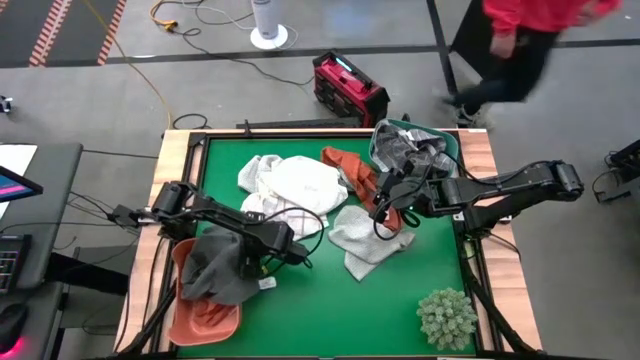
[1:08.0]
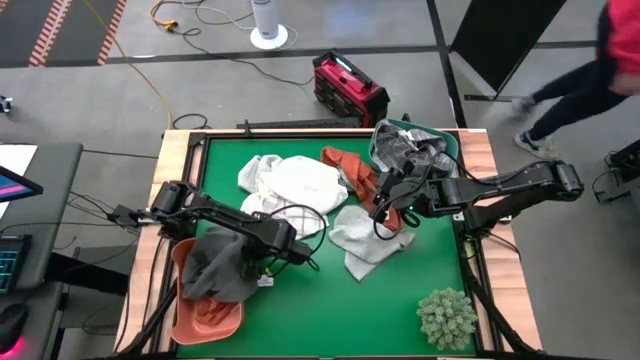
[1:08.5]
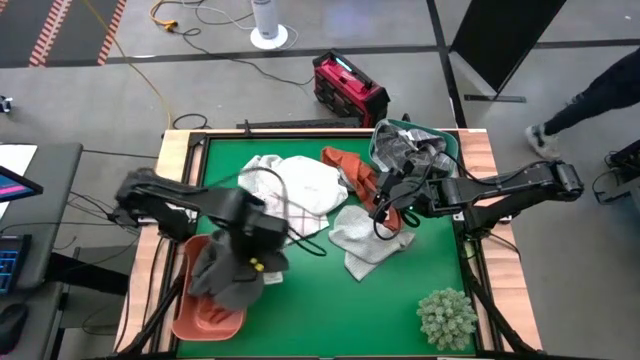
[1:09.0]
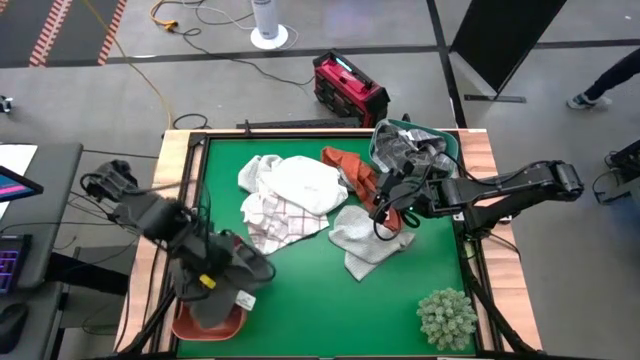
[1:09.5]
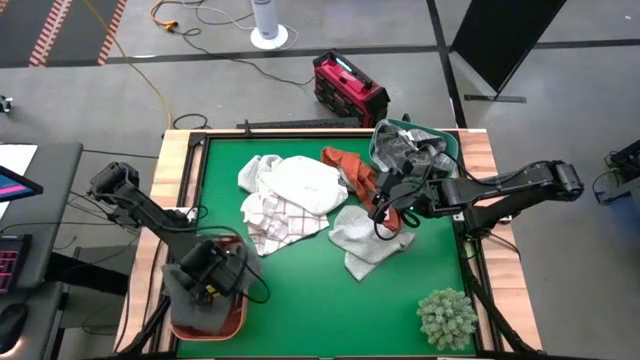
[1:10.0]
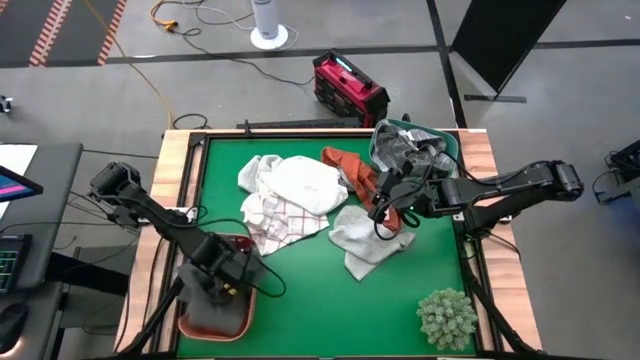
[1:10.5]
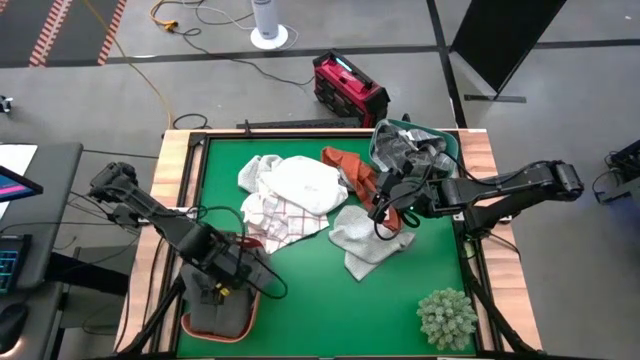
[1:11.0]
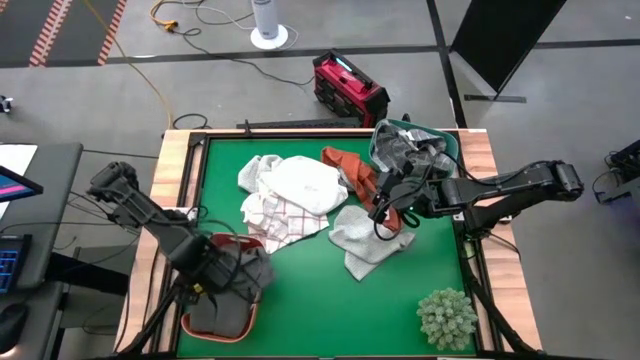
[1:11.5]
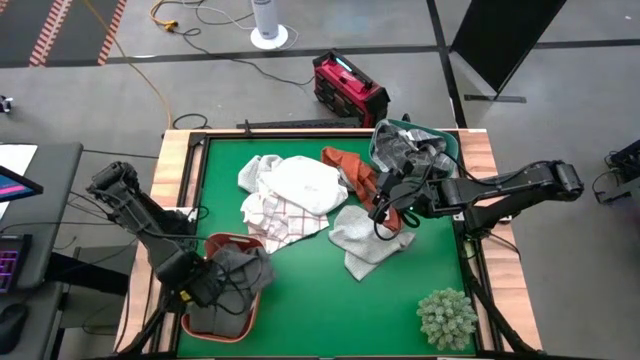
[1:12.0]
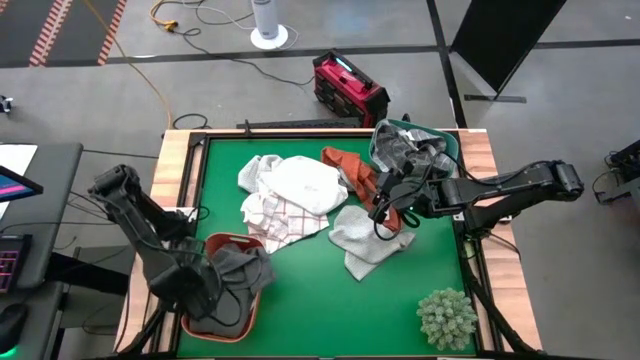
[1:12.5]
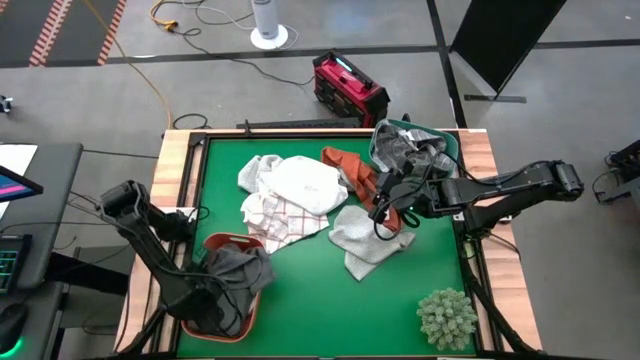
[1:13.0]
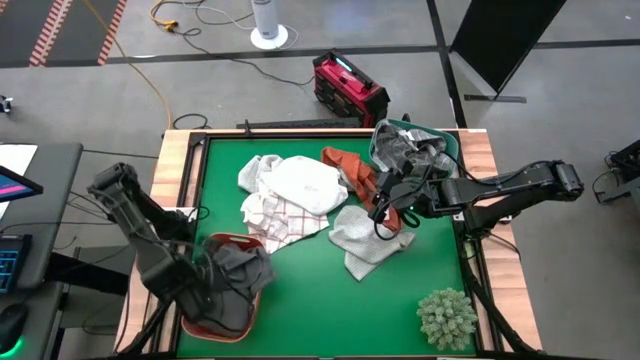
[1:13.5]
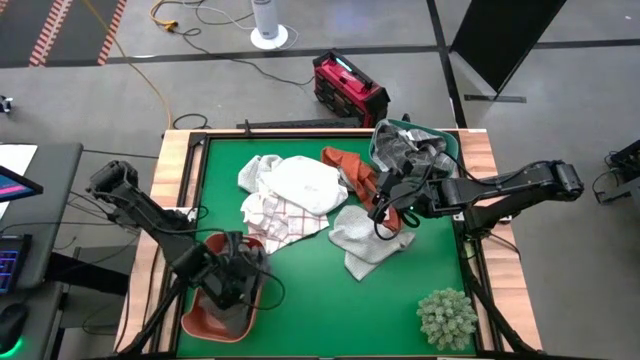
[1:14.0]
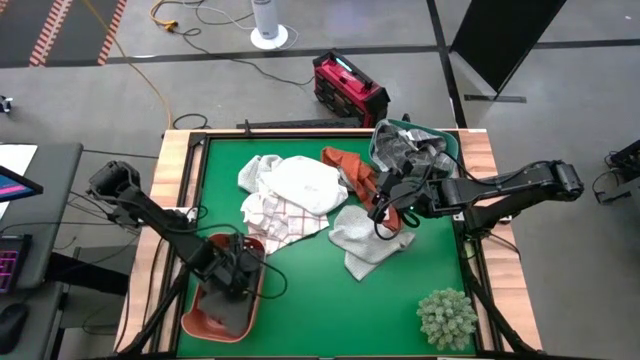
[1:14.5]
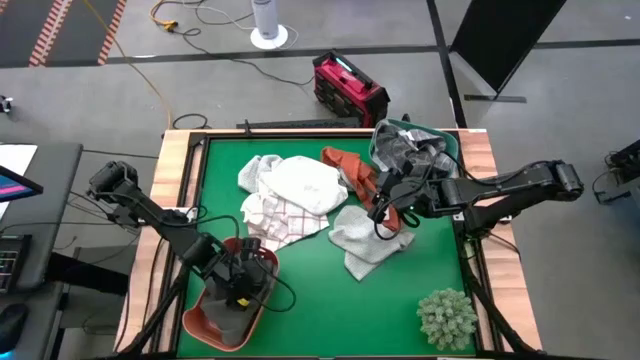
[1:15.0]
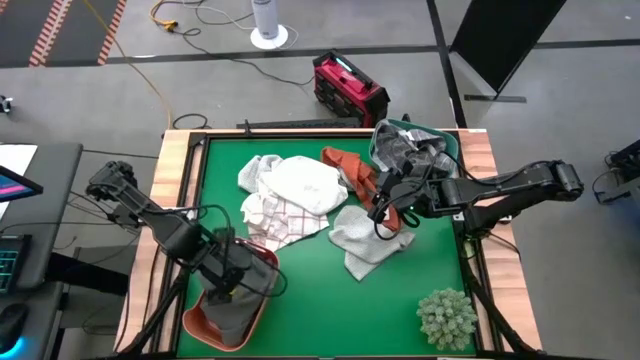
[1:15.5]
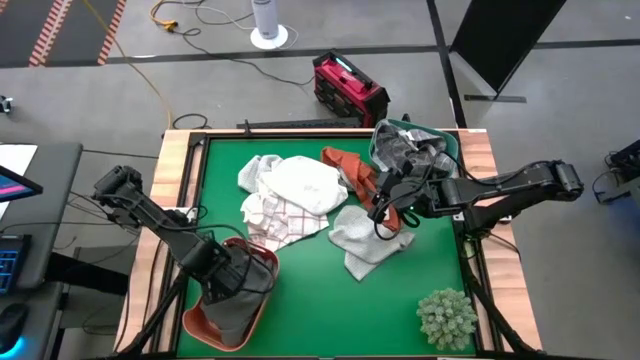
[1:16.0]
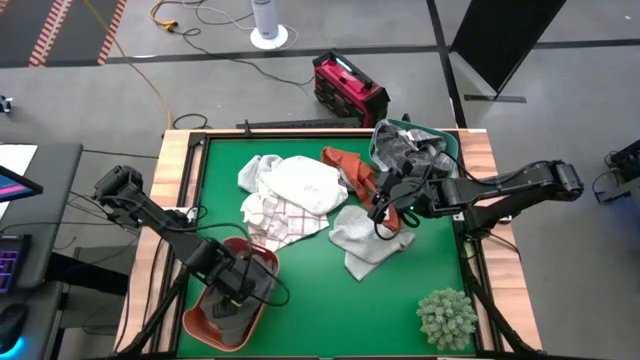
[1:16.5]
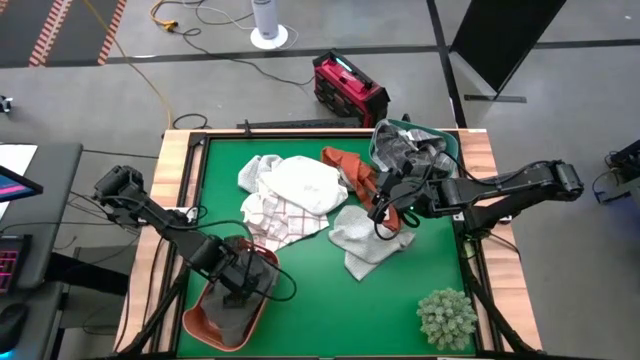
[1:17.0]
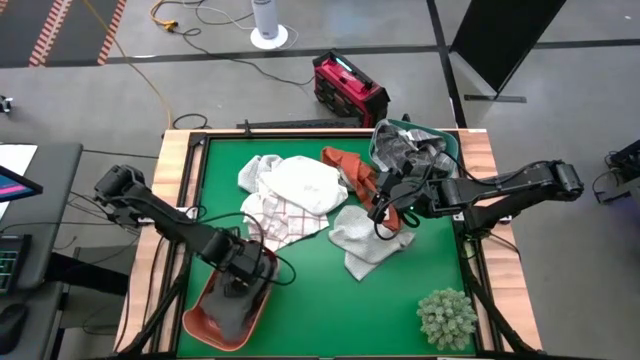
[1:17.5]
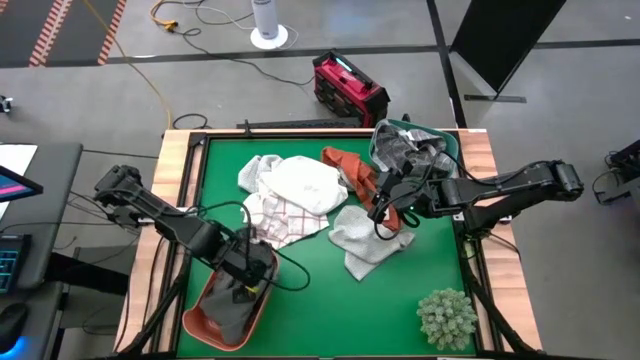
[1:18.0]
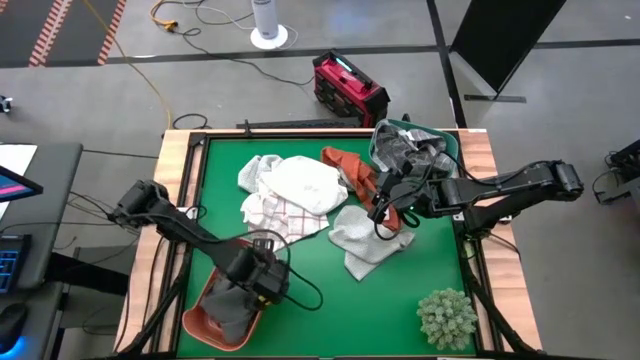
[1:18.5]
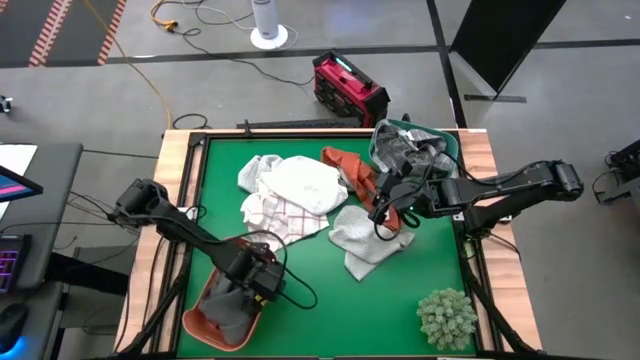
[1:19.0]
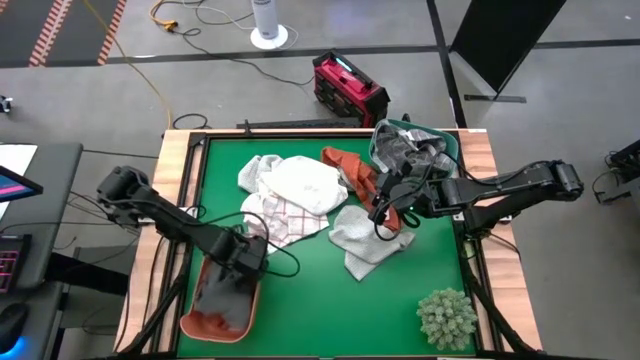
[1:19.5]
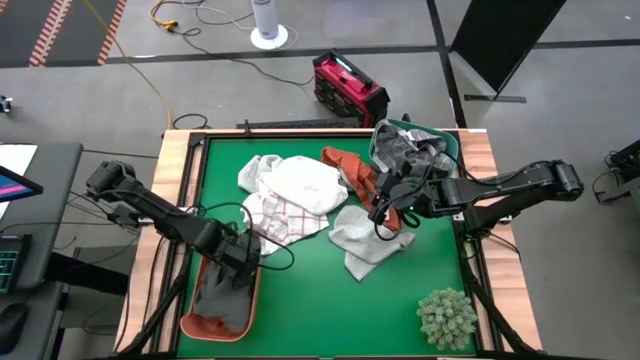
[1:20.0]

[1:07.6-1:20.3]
Task: Sort towels by color in basket
Put the gray towel into the orange bin
